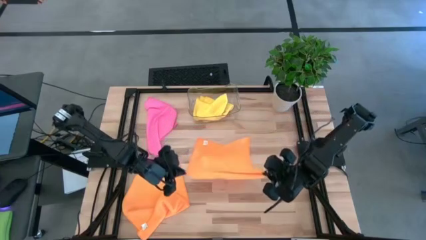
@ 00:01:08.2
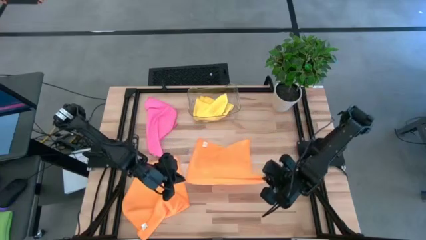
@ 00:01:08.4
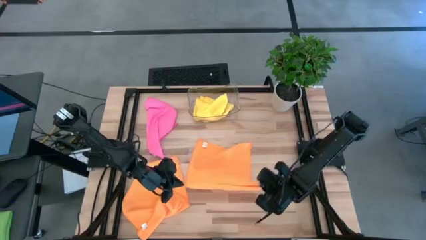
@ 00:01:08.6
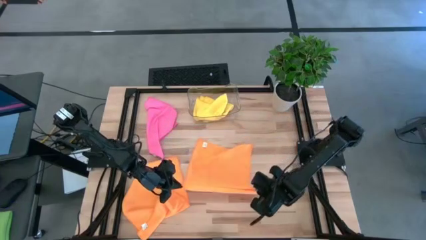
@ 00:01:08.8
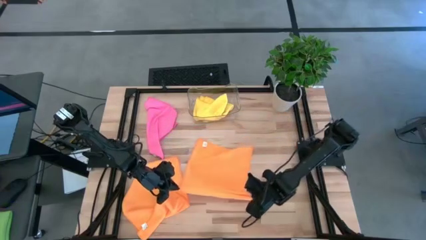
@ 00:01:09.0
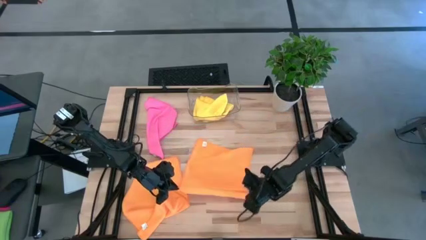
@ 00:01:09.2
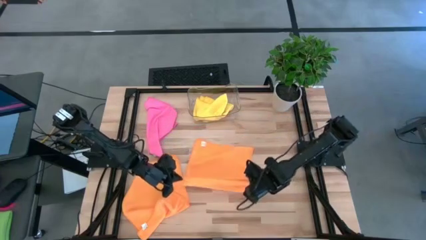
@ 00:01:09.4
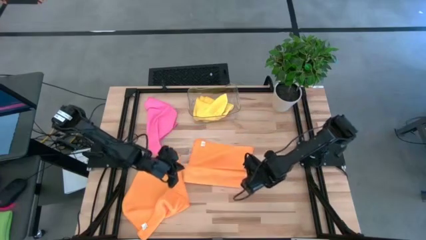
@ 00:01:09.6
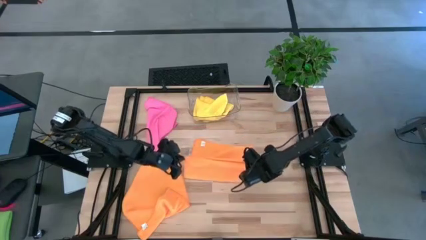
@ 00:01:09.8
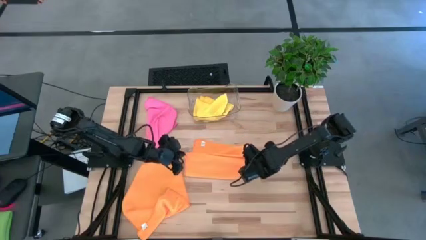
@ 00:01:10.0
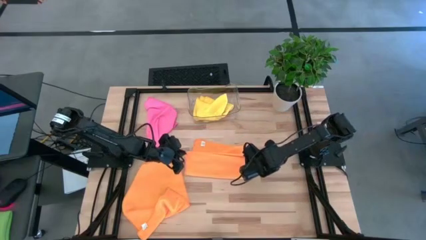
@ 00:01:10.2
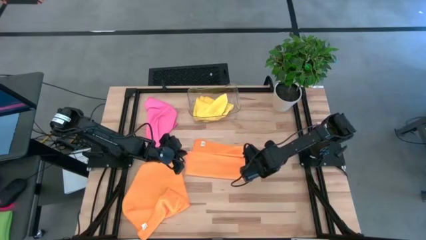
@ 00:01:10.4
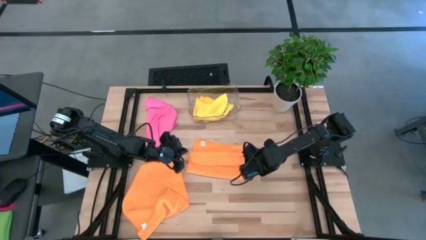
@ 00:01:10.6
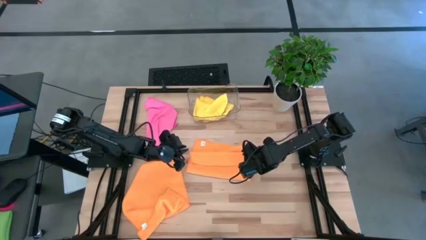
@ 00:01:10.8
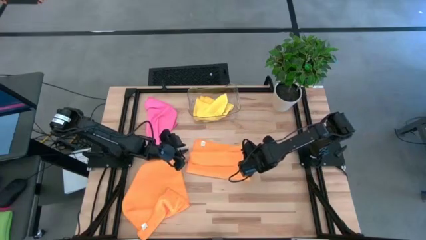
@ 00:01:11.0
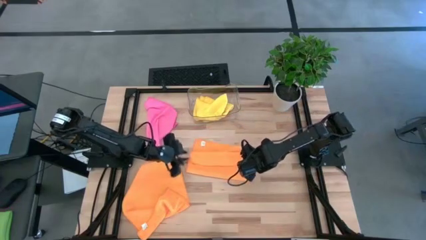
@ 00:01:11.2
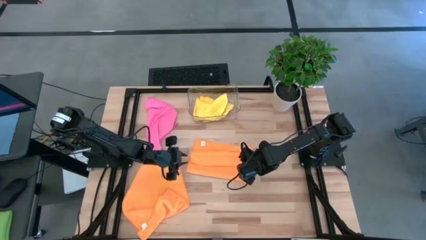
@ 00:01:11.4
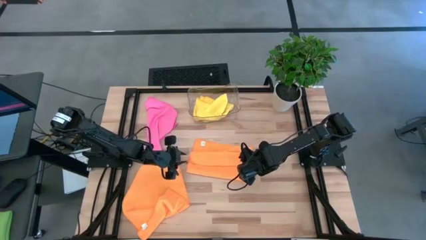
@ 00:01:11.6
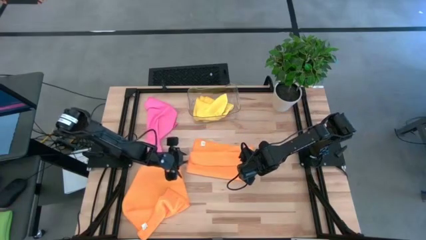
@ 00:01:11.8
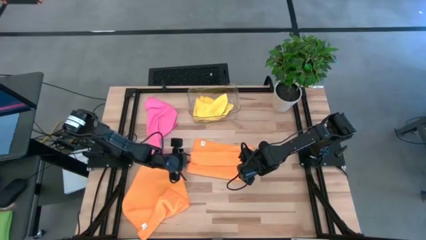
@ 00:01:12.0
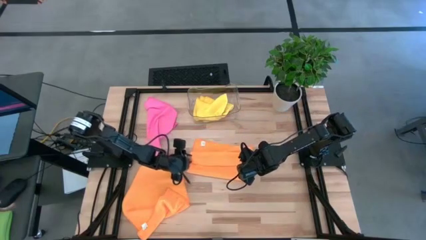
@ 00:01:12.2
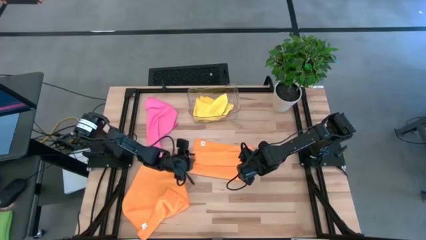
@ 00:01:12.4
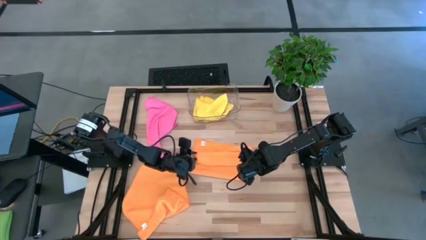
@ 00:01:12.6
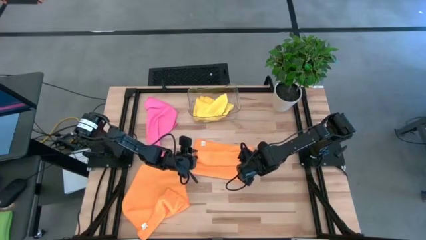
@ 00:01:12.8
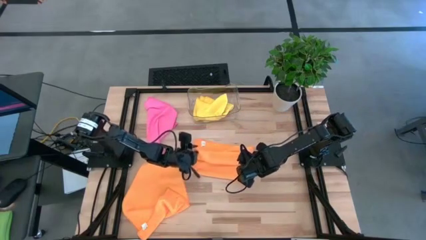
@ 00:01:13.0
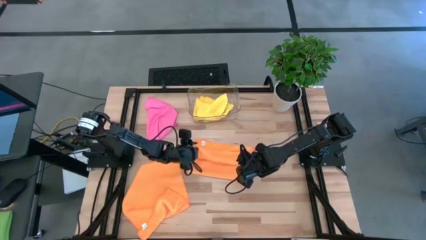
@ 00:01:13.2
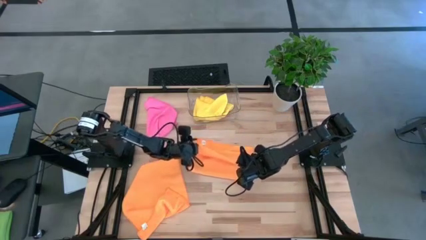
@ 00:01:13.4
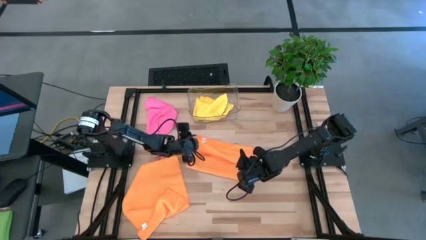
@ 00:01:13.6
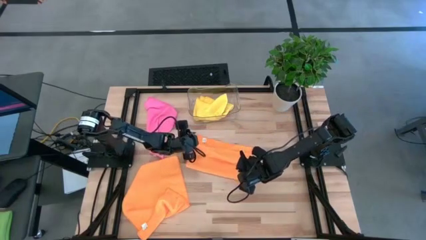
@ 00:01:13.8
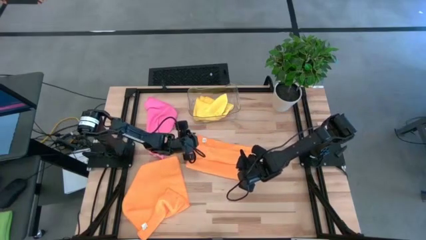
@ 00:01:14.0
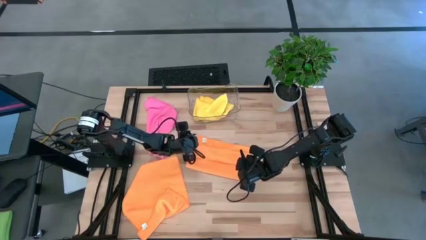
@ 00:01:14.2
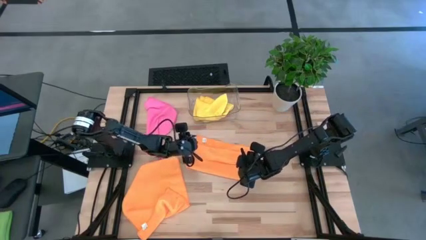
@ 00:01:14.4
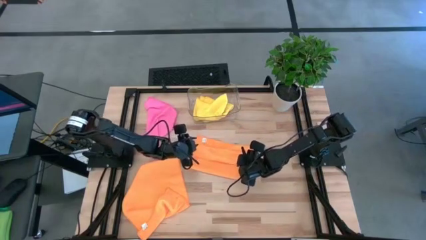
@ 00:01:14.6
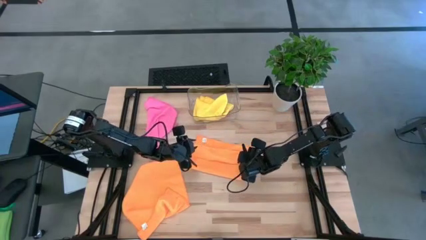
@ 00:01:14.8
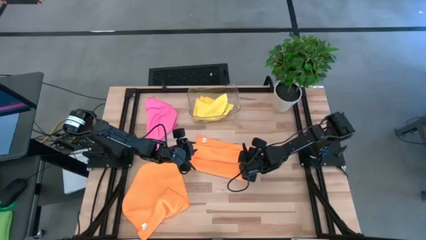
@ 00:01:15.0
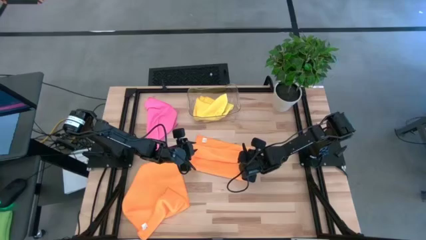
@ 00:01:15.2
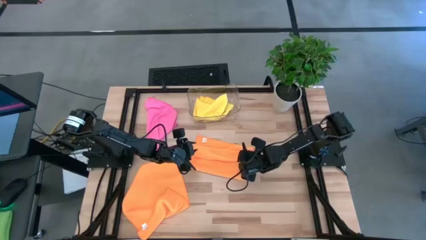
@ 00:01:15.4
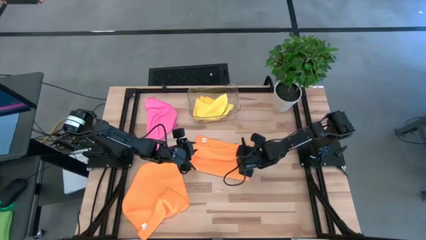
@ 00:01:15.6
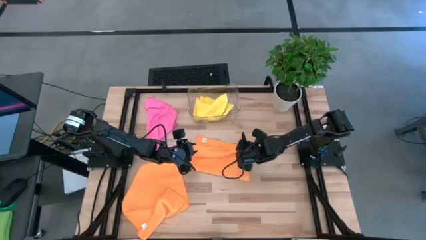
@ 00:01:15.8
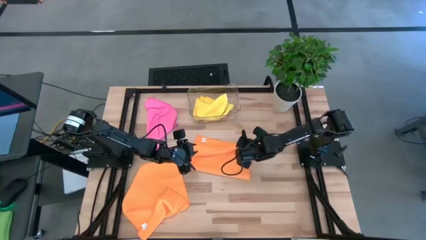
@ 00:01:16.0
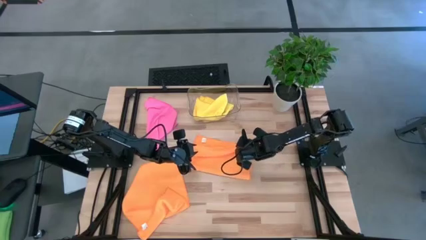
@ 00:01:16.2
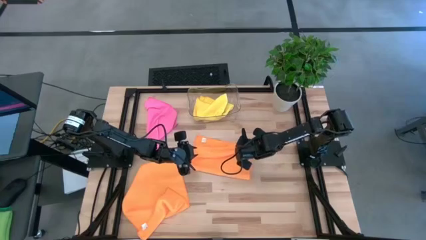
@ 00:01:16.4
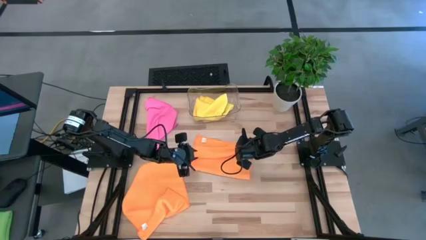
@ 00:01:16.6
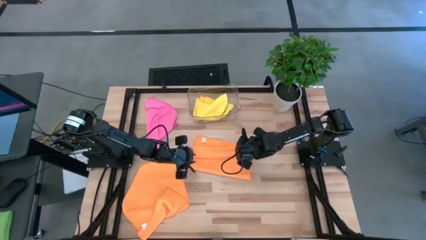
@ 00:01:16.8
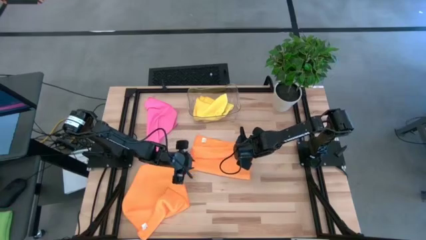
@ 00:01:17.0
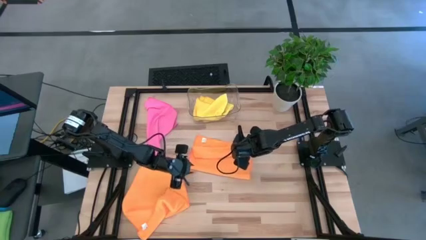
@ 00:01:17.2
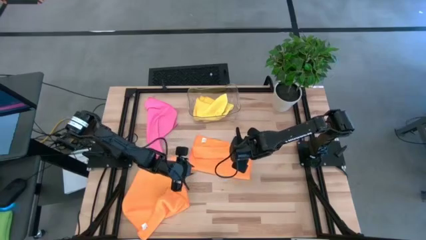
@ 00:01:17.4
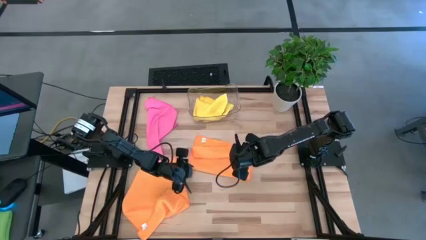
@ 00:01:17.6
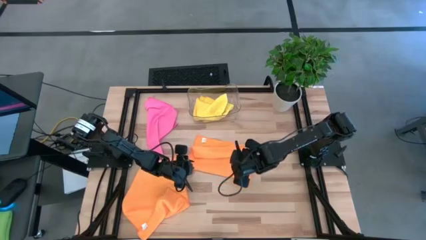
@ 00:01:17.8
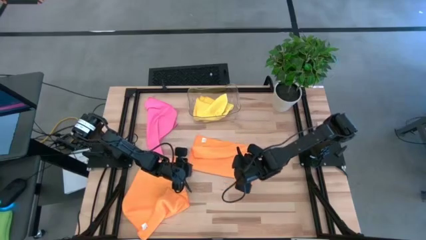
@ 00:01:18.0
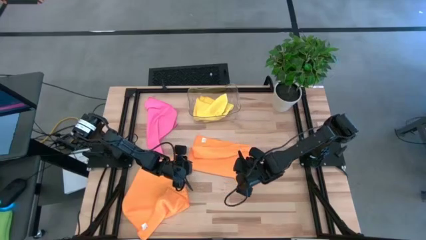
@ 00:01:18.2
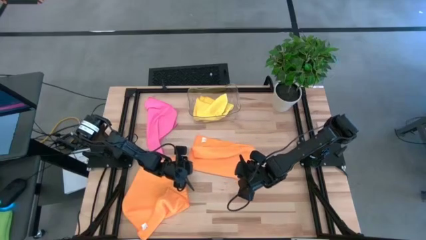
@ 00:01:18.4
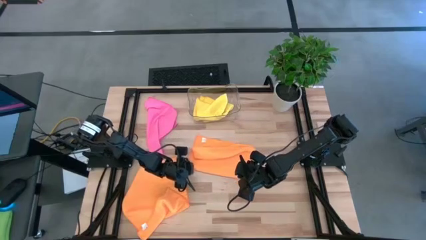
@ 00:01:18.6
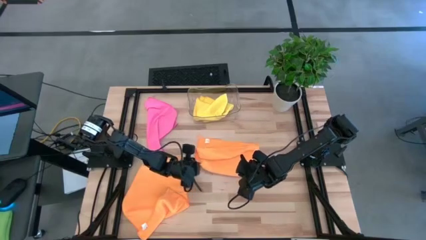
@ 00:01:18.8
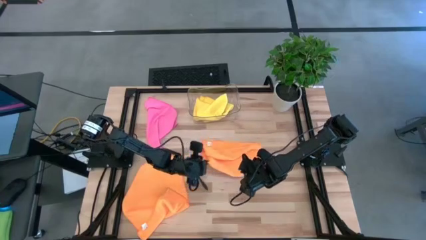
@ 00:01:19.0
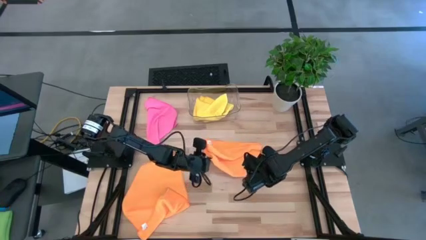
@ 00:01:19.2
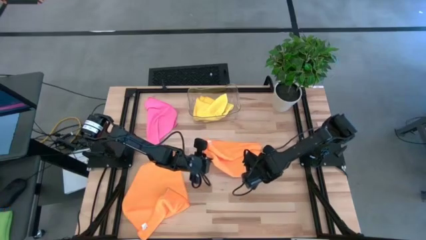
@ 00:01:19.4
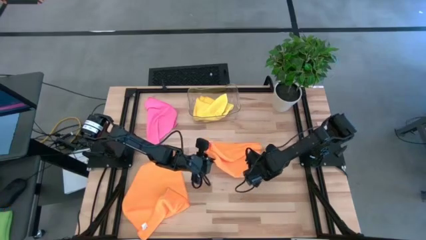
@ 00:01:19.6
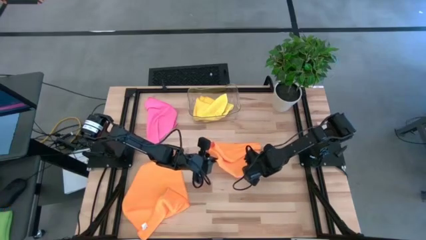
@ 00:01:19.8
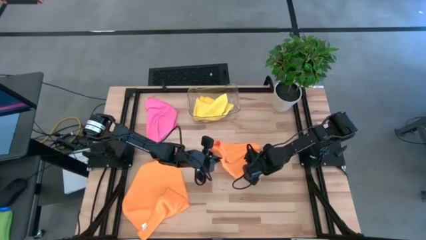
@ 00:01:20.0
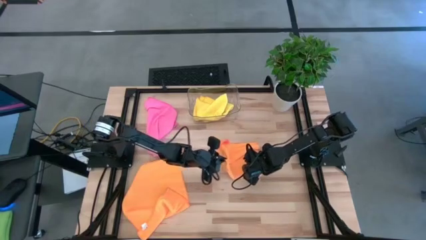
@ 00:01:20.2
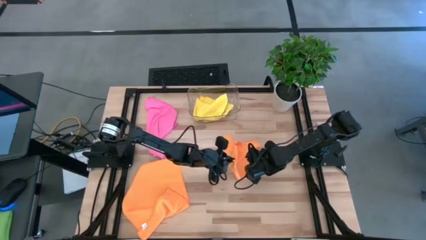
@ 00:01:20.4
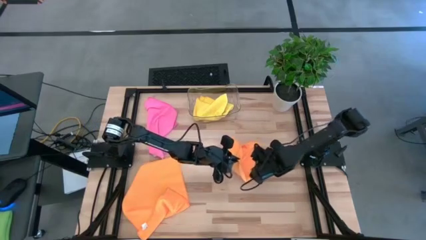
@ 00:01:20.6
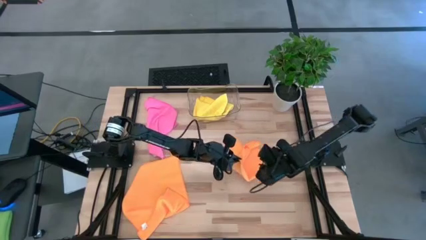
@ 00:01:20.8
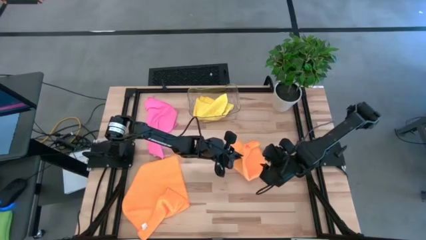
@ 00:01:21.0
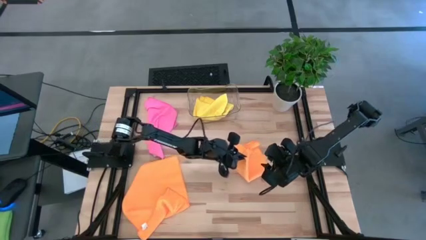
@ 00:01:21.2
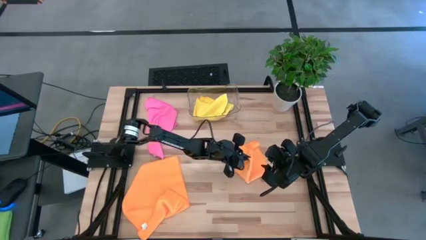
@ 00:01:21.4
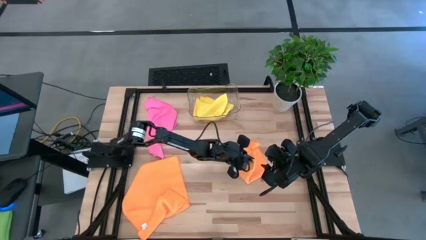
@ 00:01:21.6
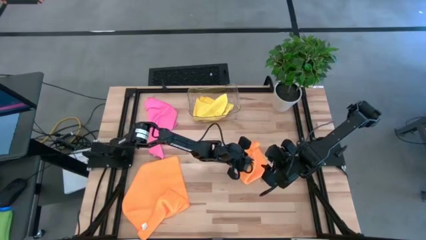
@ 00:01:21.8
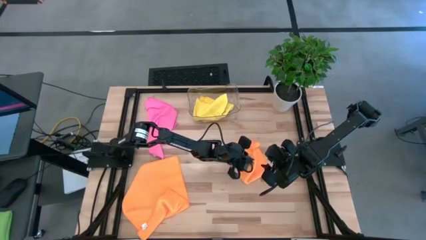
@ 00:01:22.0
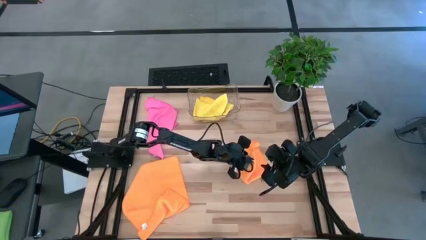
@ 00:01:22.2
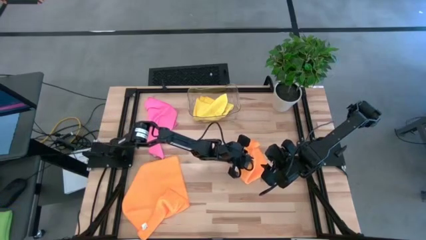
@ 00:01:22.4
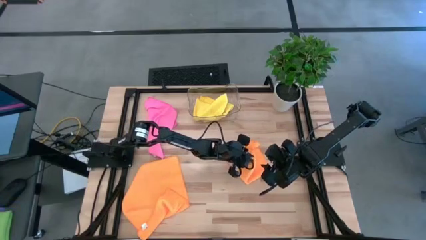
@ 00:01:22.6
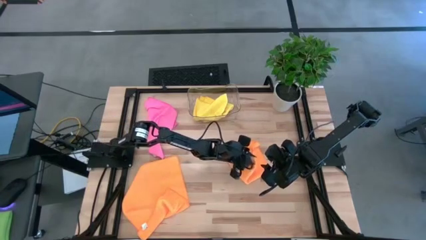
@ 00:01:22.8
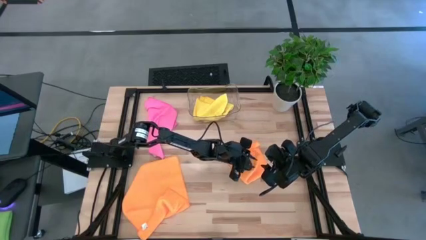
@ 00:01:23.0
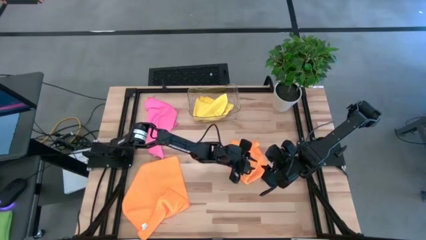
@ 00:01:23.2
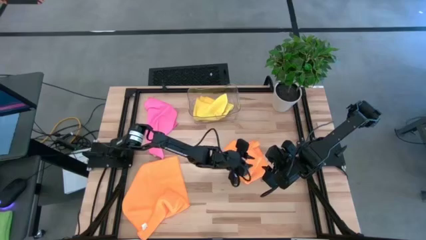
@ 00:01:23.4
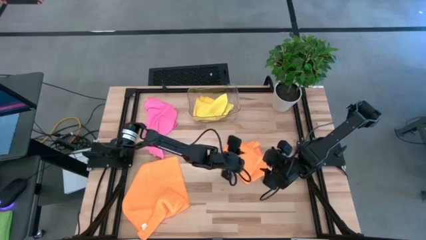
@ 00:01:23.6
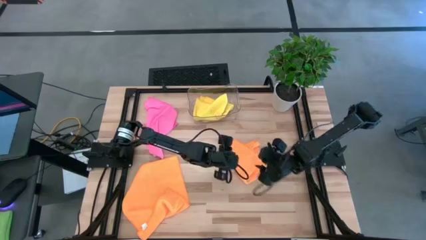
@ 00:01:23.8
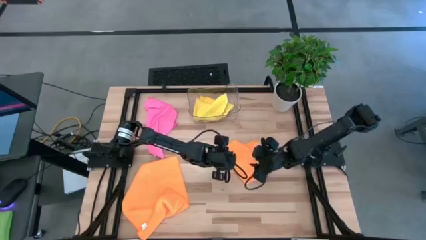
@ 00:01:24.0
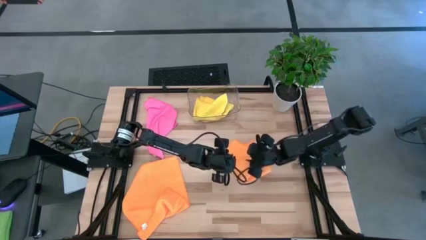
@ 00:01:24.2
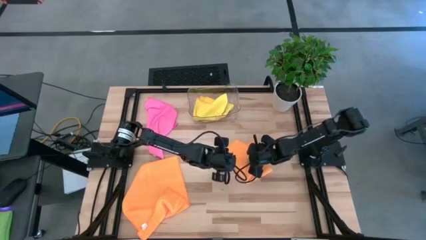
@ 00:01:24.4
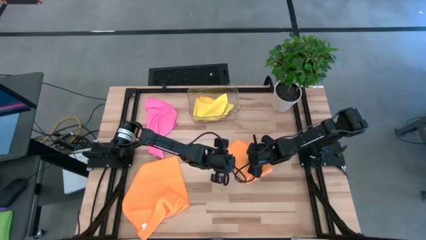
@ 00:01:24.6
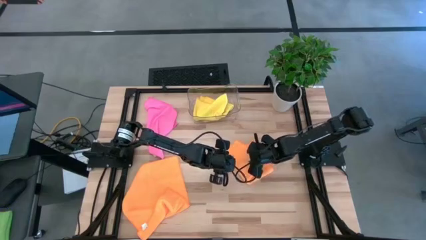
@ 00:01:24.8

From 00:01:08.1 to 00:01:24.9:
Task: Fold microfiber towels
Fold the right orange towel
